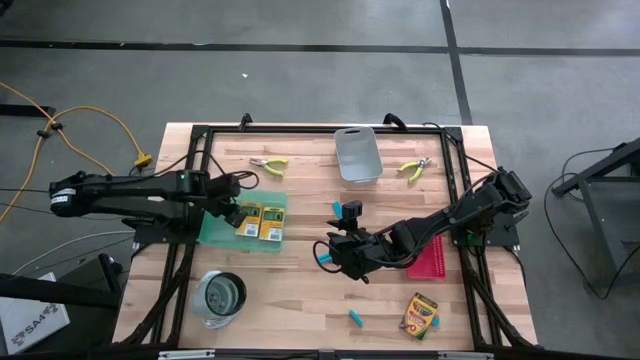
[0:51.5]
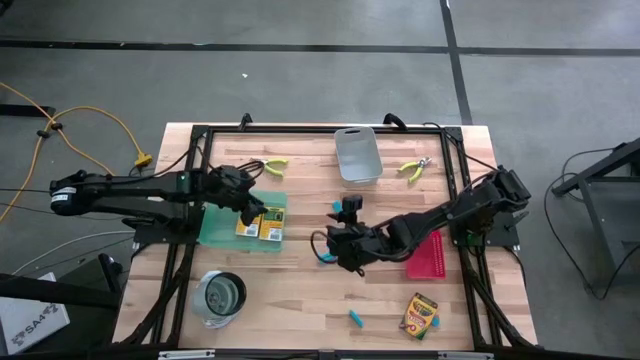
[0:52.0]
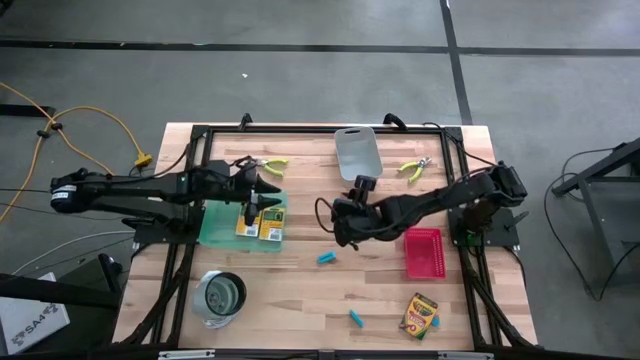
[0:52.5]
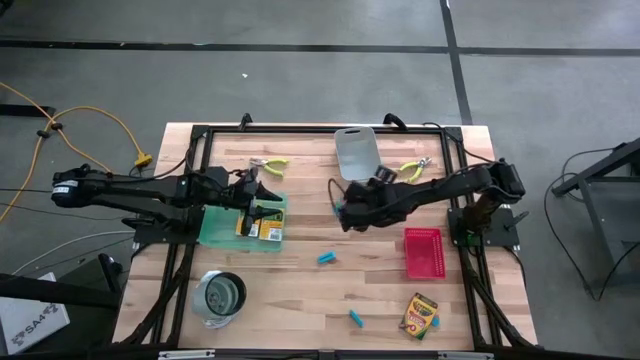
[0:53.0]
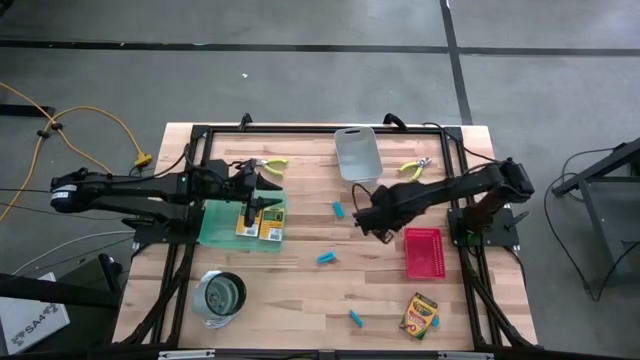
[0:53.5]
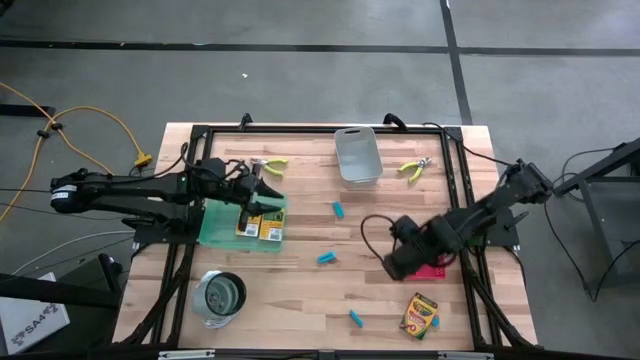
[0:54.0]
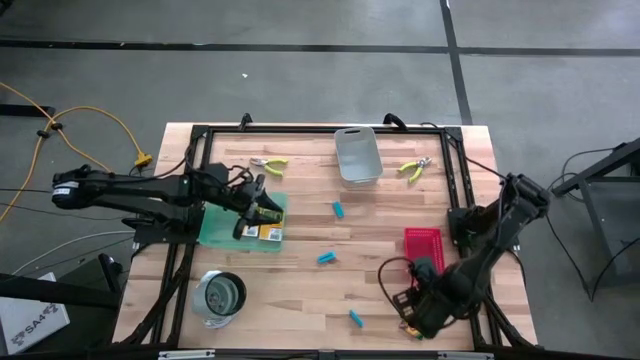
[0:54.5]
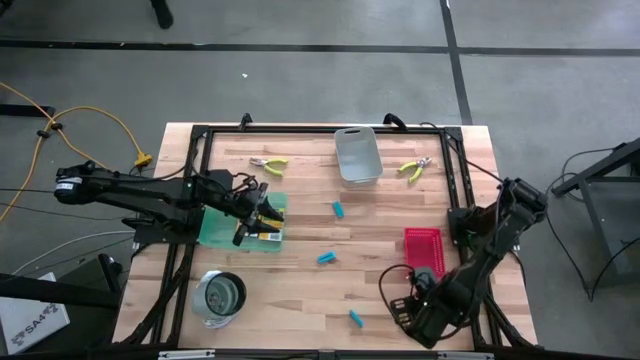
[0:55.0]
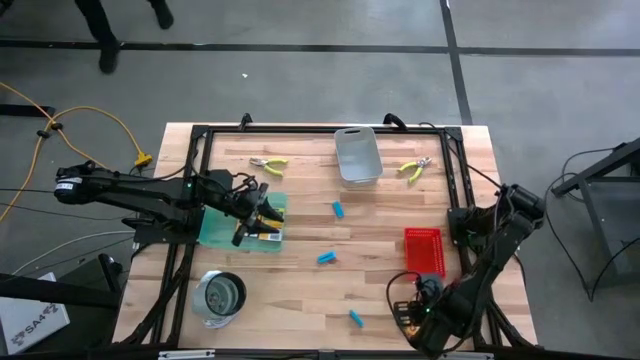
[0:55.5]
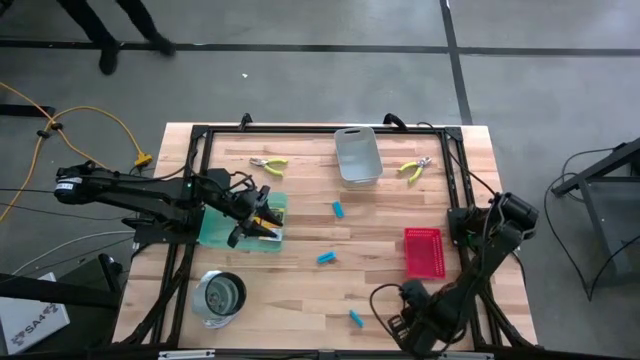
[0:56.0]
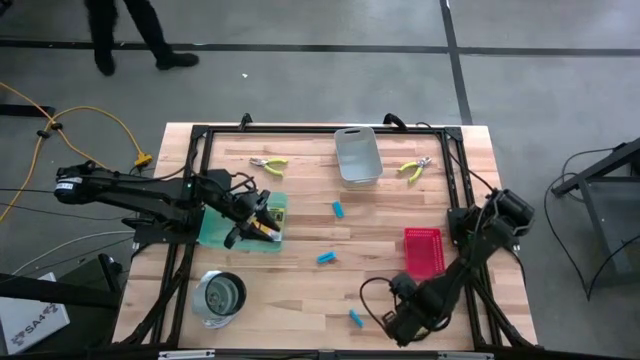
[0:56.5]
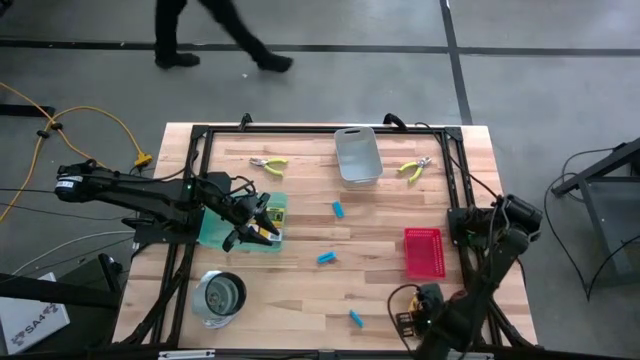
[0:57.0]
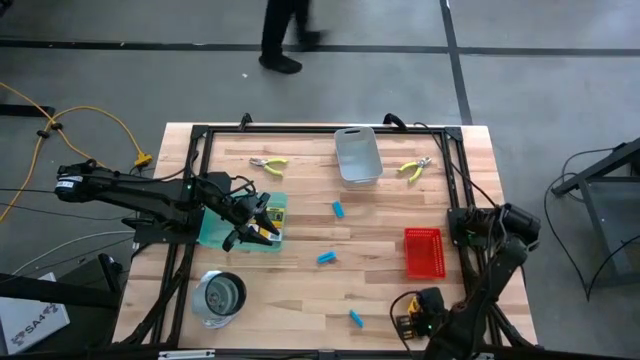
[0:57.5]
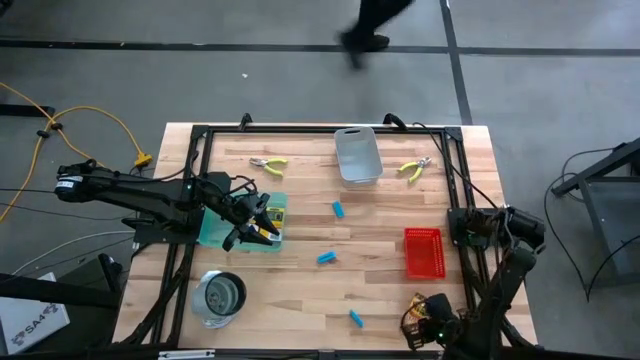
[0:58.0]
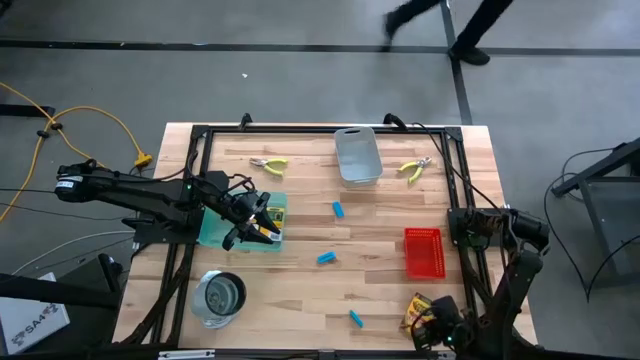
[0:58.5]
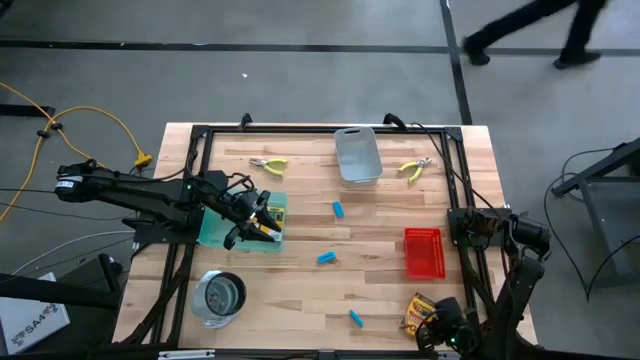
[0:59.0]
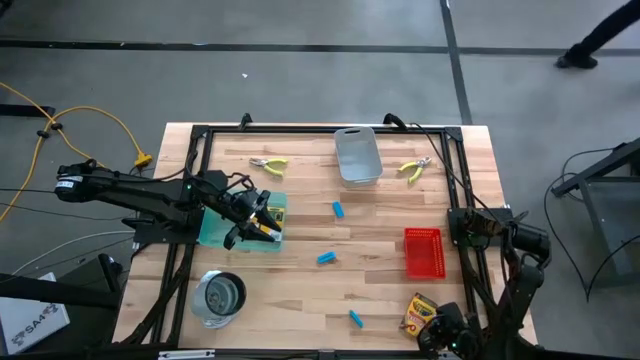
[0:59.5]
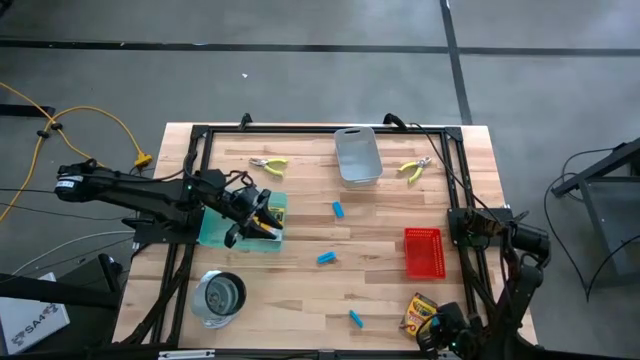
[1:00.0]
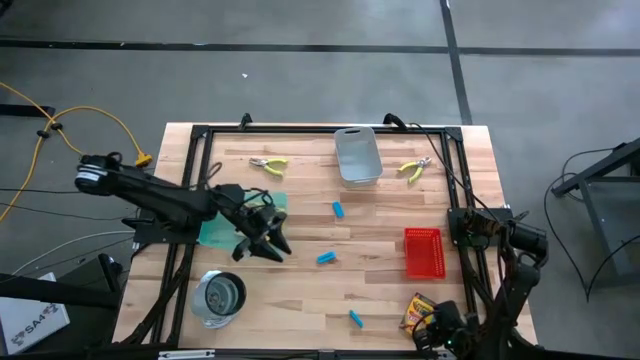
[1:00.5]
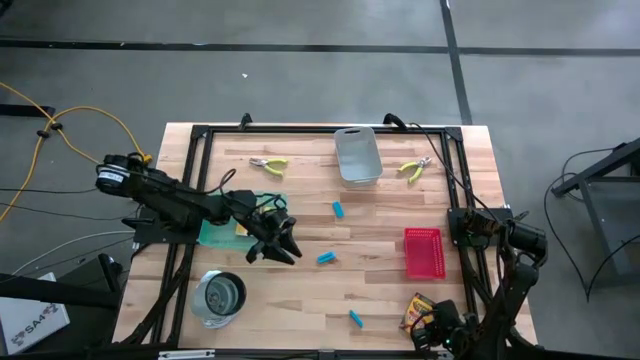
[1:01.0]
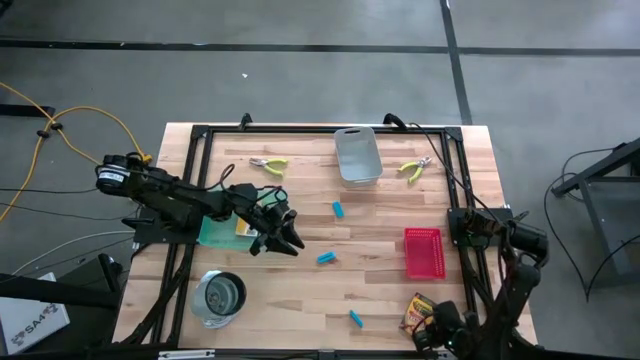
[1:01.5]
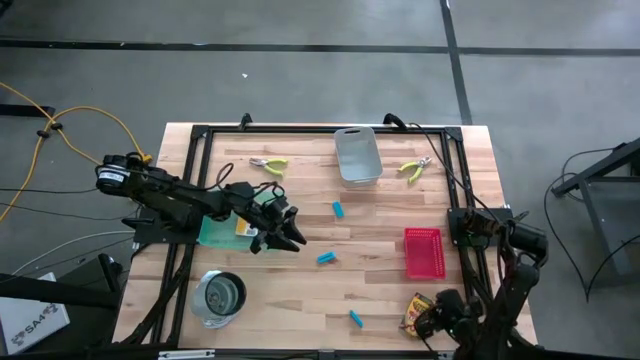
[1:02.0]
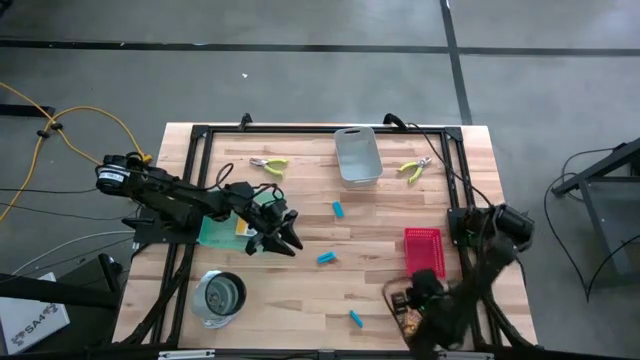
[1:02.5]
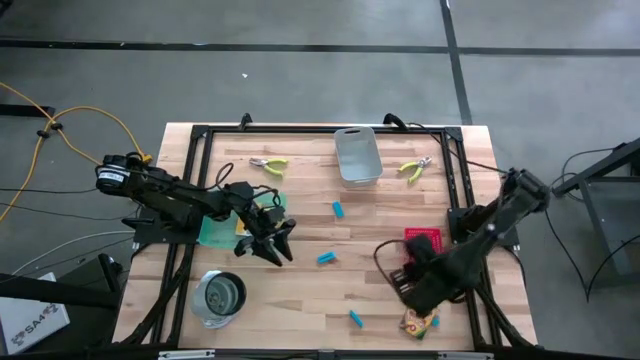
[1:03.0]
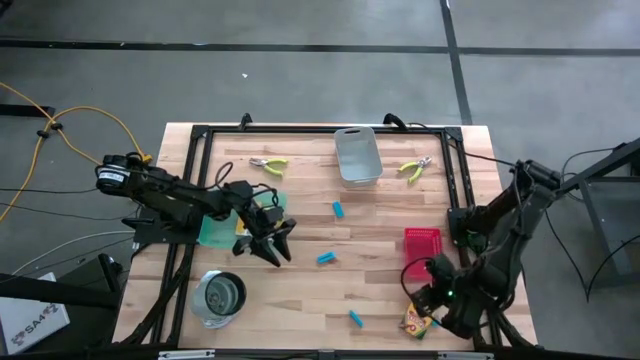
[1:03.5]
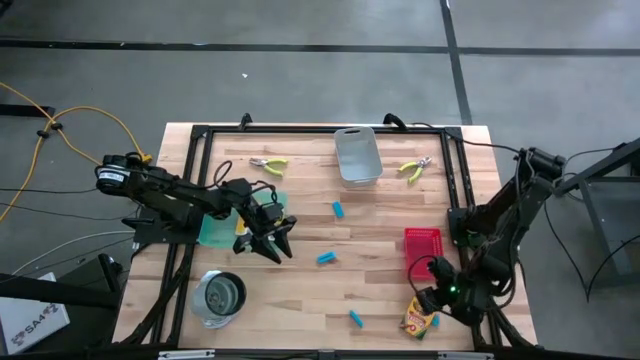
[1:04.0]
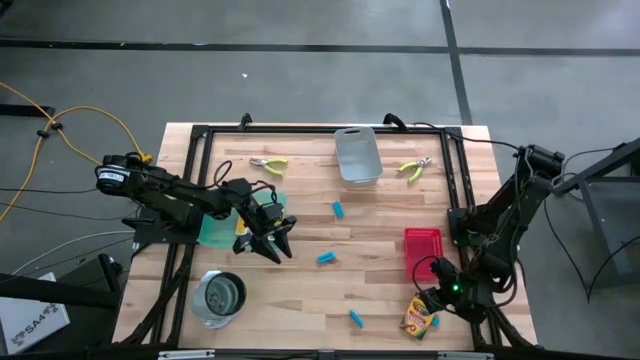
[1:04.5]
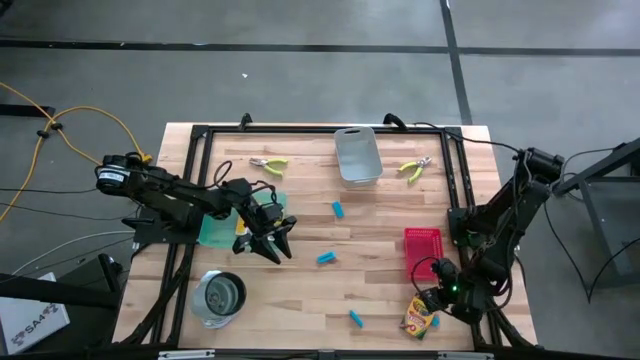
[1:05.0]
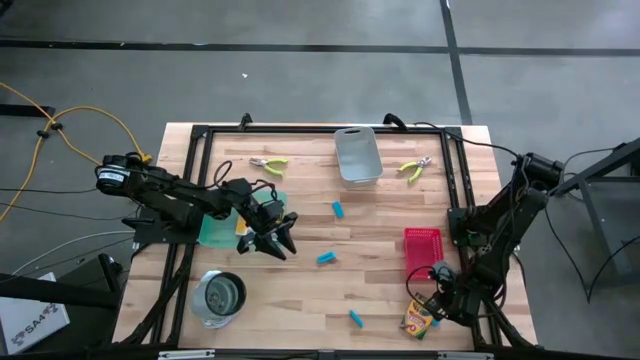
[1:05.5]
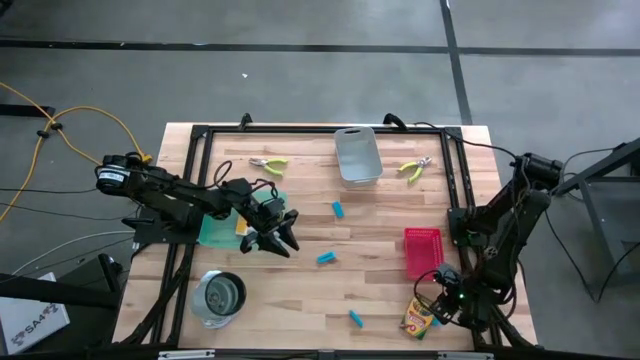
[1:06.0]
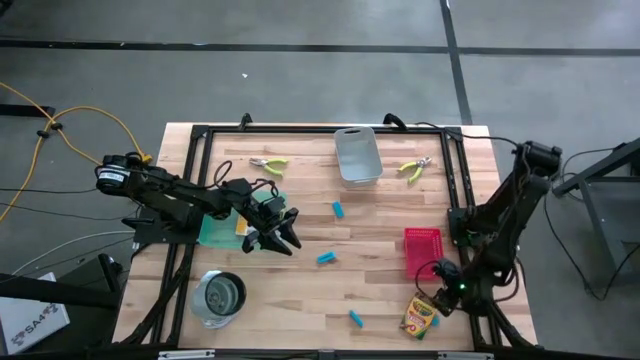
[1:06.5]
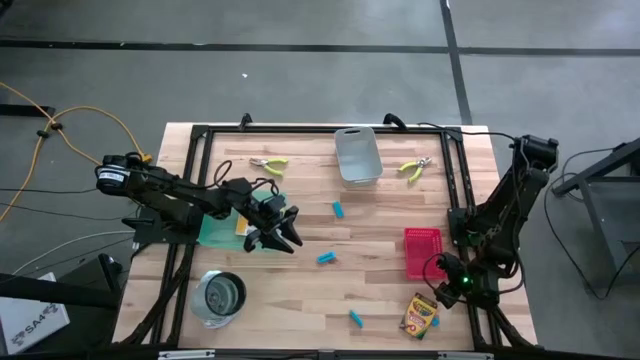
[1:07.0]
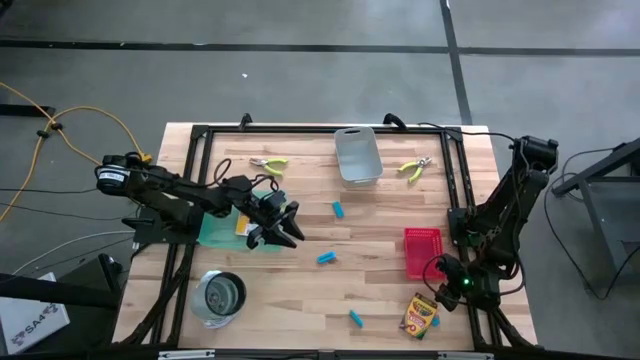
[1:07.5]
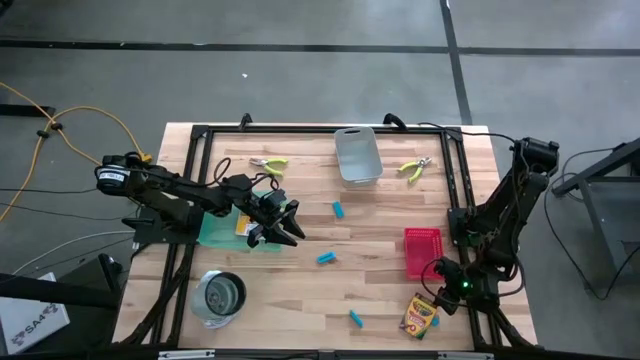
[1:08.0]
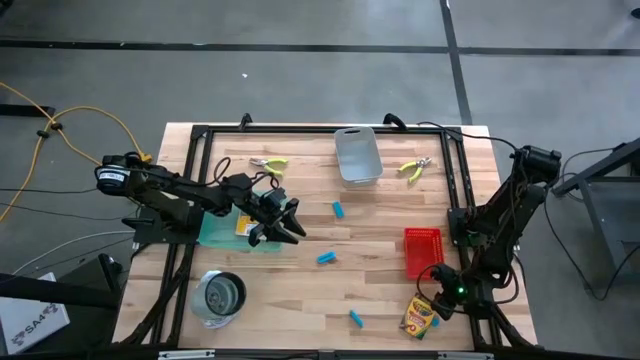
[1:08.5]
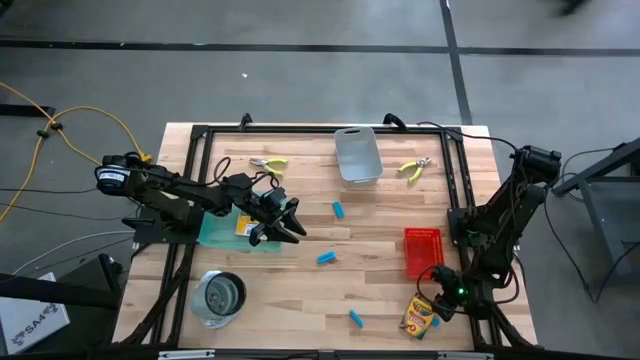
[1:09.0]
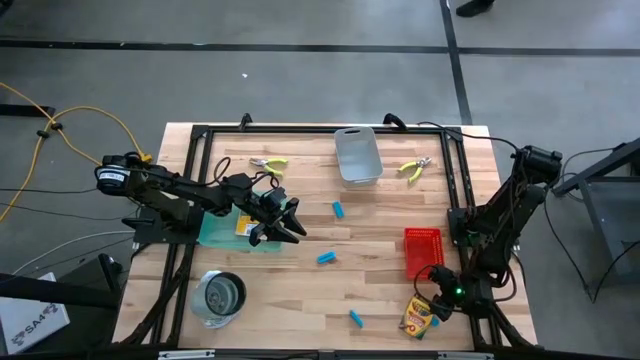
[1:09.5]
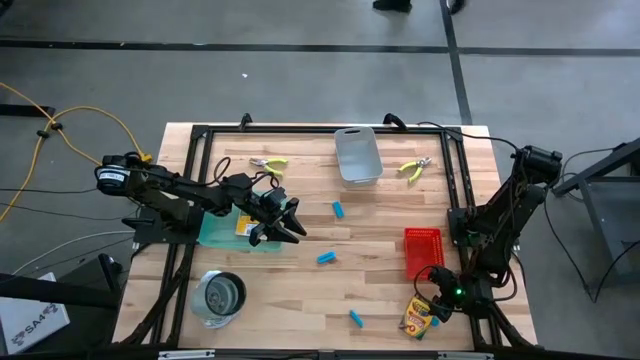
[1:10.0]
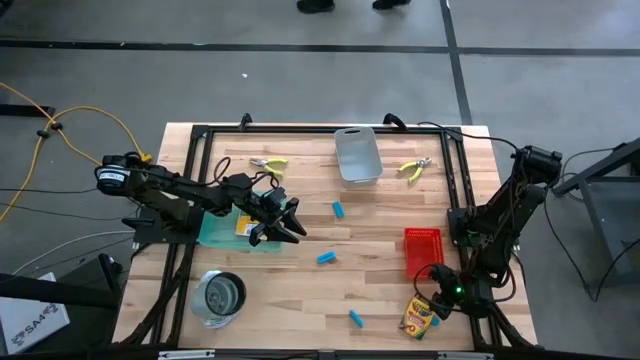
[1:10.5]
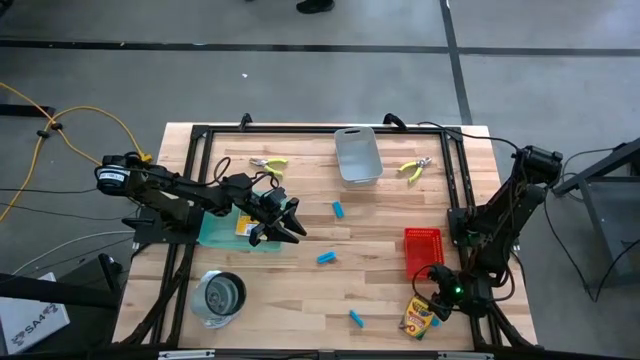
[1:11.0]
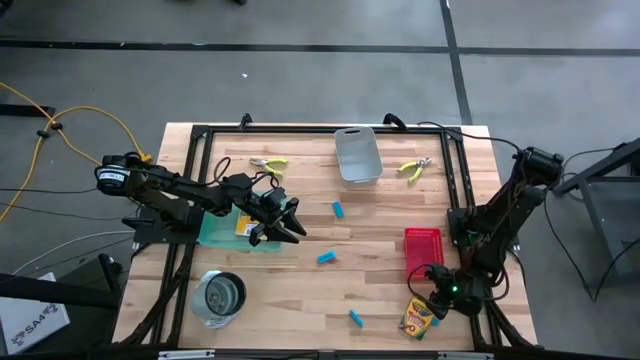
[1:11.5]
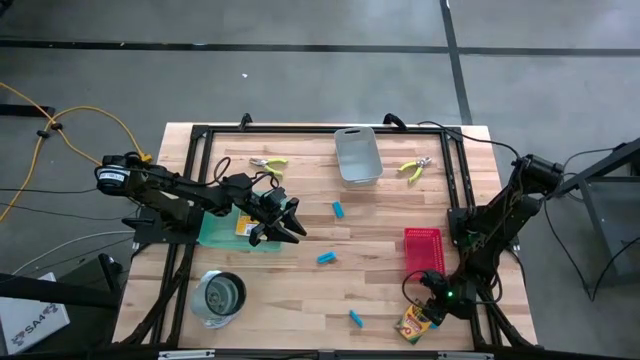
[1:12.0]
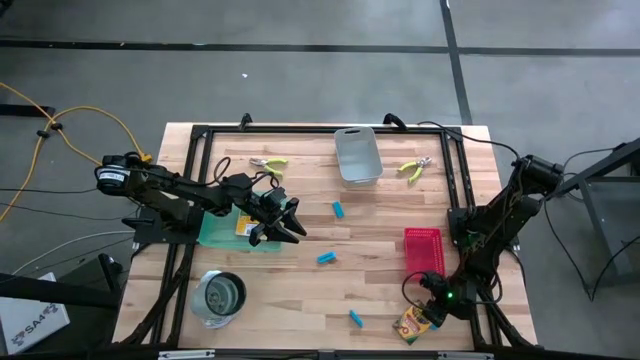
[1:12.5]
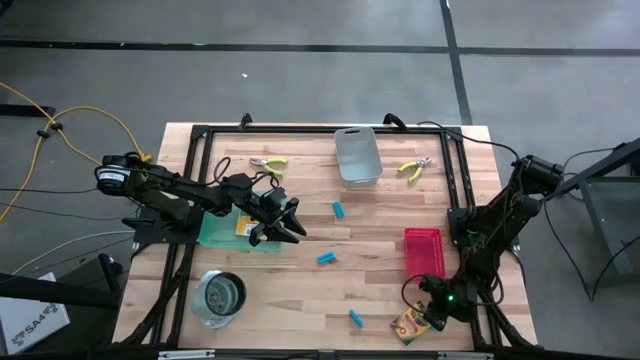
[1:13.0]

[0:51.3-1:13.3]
Task: Pick & Place School Supplies
Put the crayon box into the green bin
